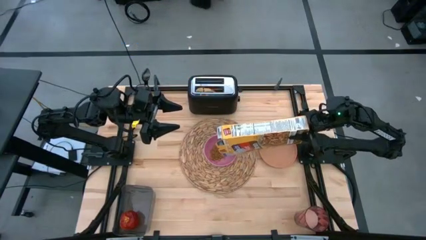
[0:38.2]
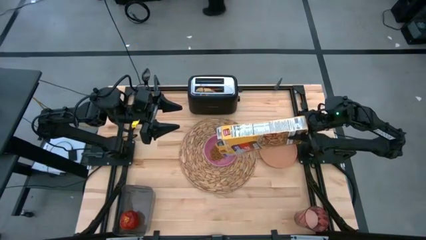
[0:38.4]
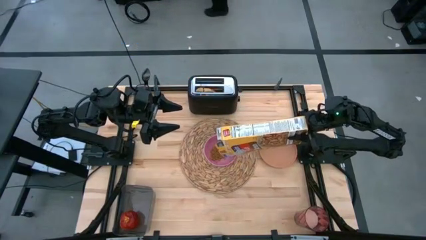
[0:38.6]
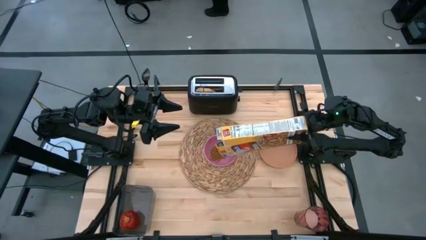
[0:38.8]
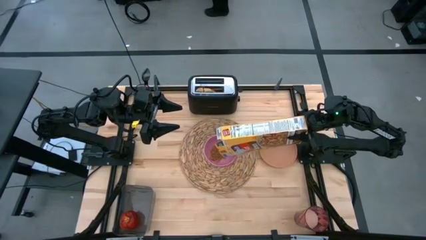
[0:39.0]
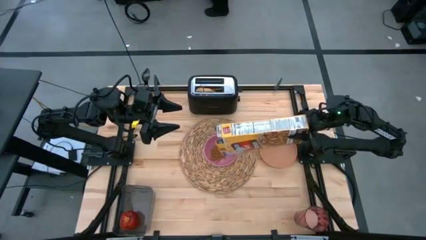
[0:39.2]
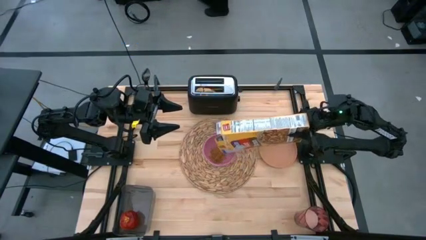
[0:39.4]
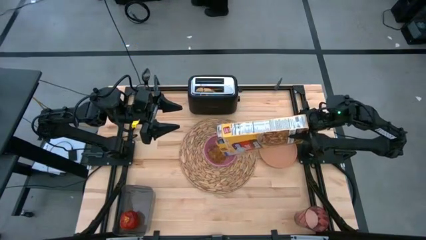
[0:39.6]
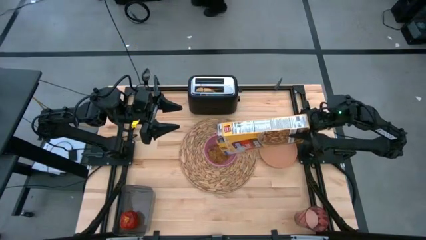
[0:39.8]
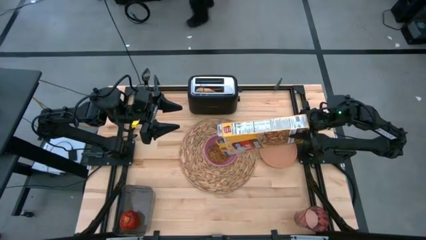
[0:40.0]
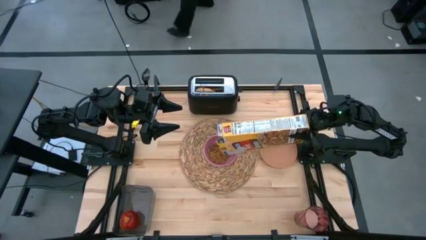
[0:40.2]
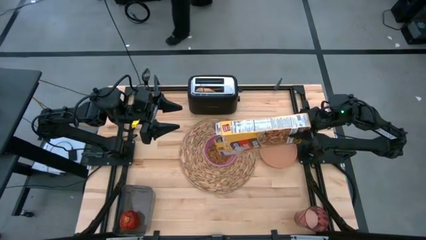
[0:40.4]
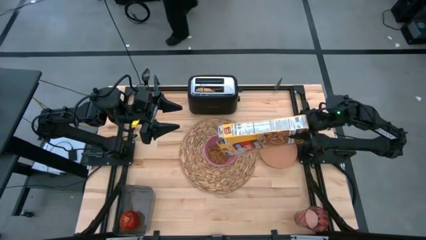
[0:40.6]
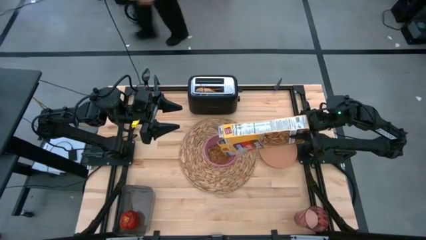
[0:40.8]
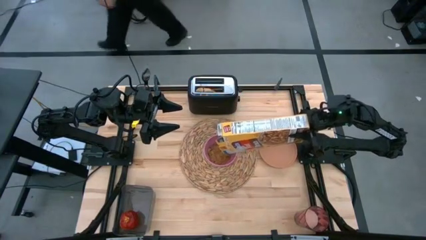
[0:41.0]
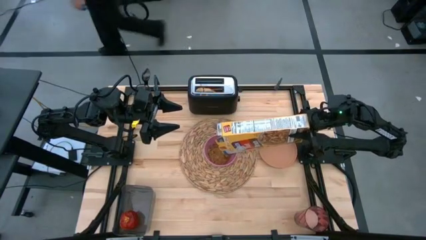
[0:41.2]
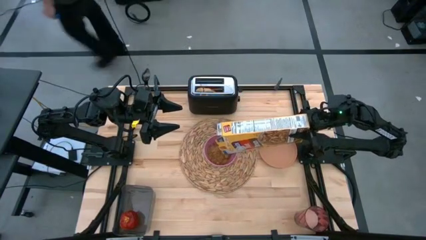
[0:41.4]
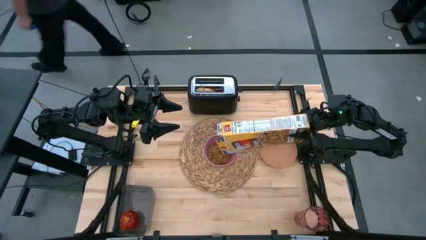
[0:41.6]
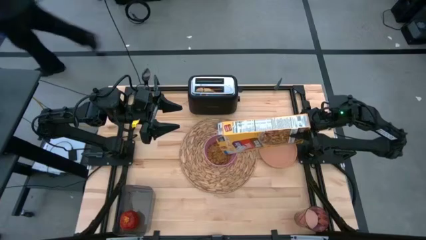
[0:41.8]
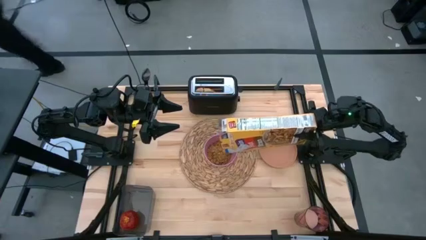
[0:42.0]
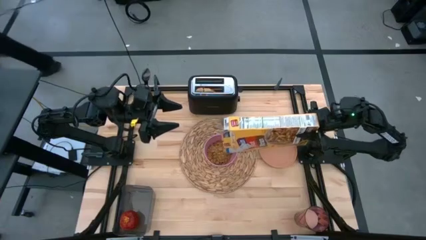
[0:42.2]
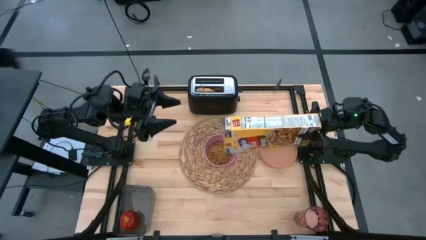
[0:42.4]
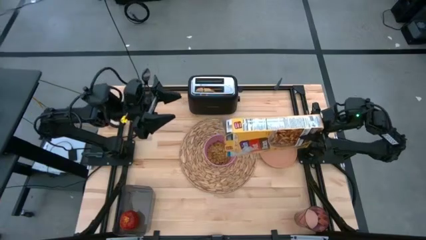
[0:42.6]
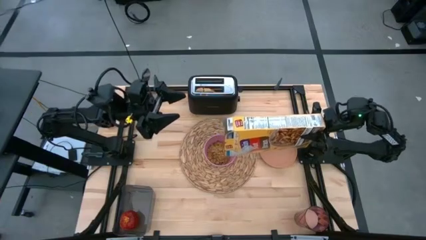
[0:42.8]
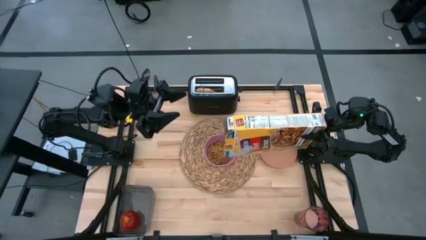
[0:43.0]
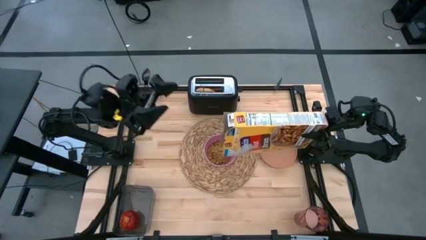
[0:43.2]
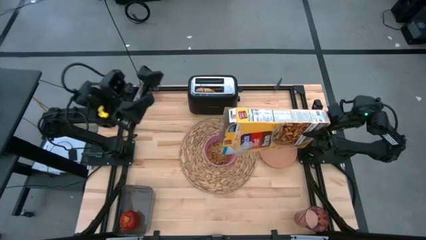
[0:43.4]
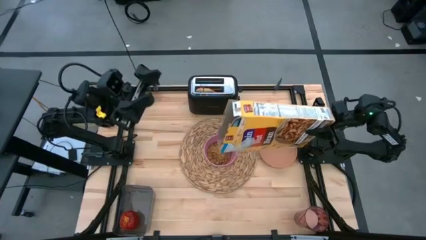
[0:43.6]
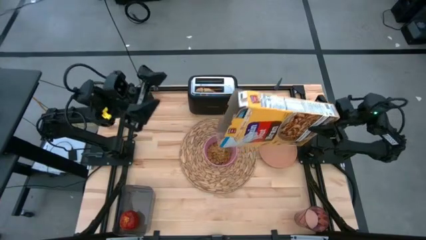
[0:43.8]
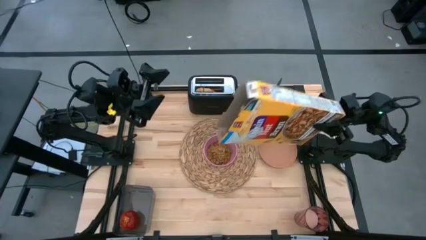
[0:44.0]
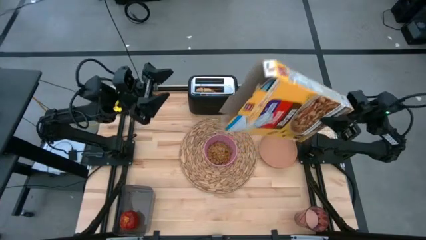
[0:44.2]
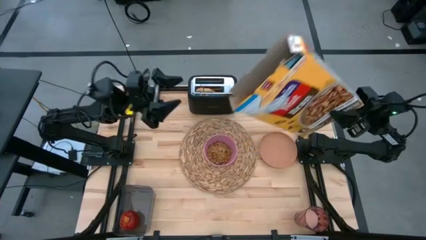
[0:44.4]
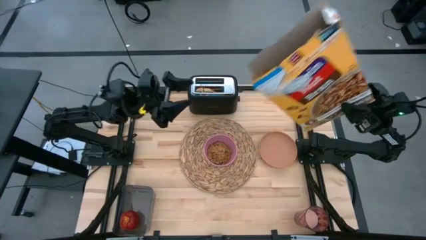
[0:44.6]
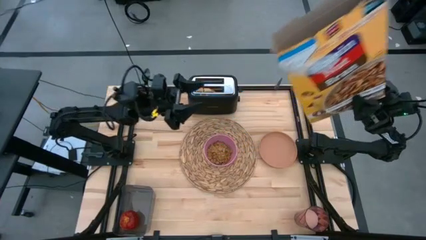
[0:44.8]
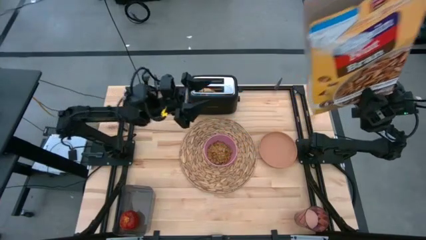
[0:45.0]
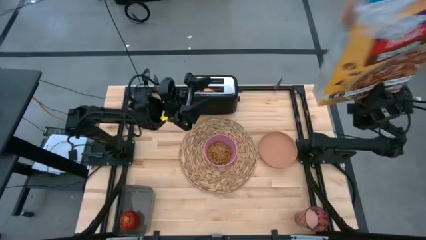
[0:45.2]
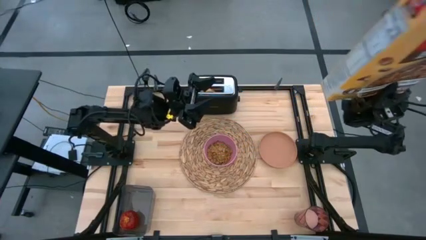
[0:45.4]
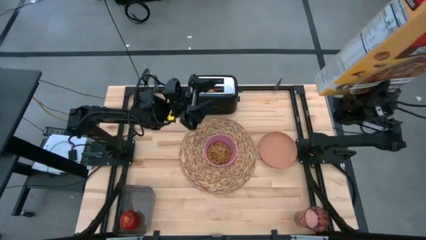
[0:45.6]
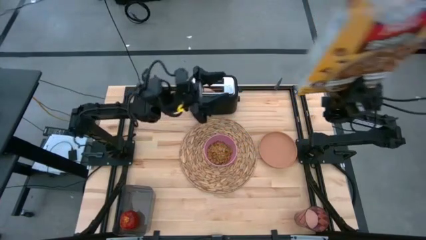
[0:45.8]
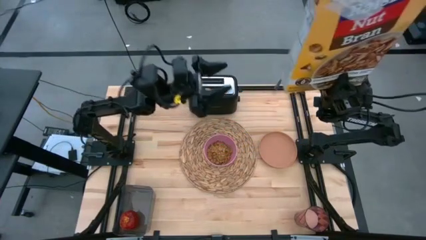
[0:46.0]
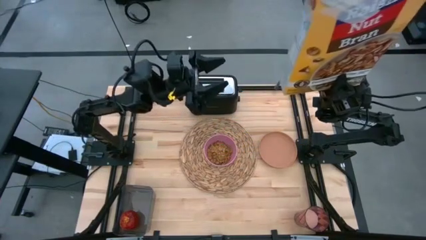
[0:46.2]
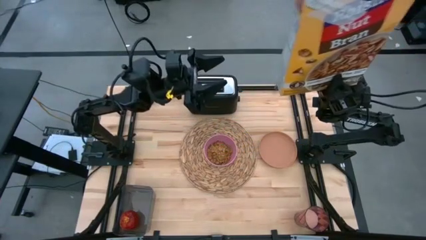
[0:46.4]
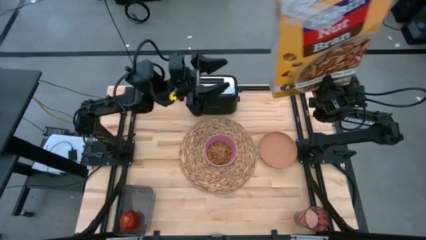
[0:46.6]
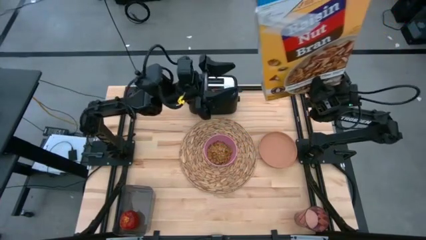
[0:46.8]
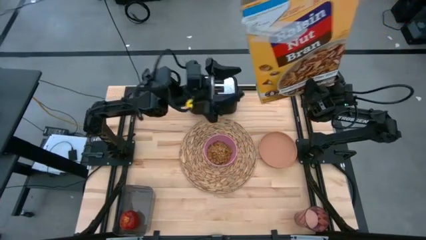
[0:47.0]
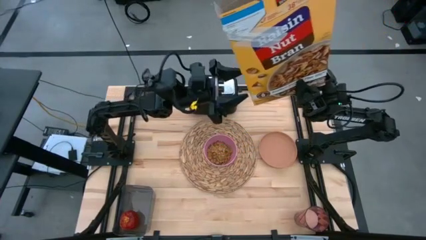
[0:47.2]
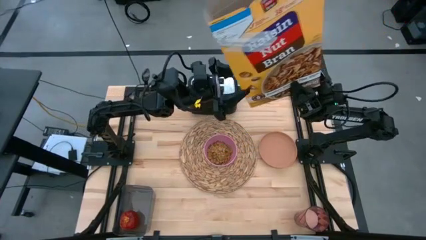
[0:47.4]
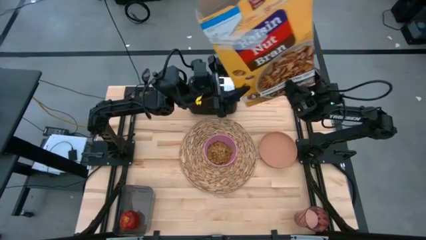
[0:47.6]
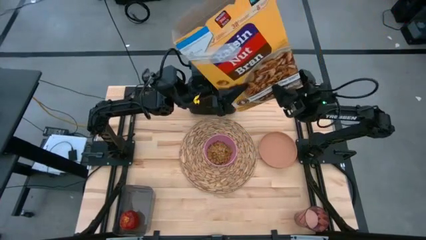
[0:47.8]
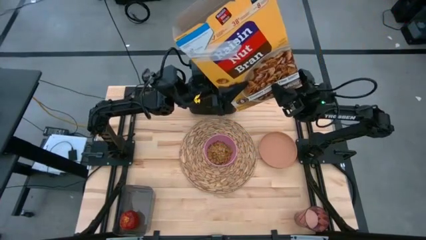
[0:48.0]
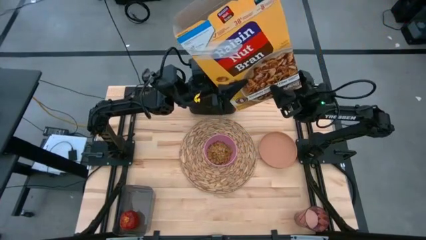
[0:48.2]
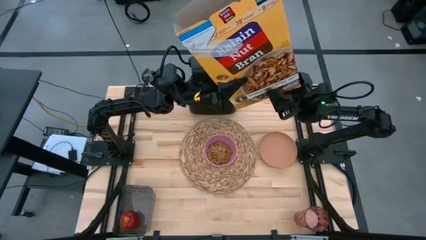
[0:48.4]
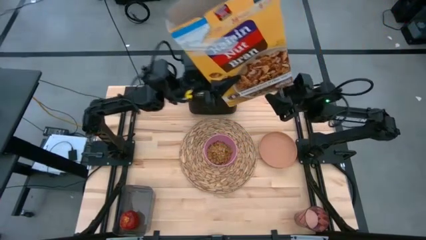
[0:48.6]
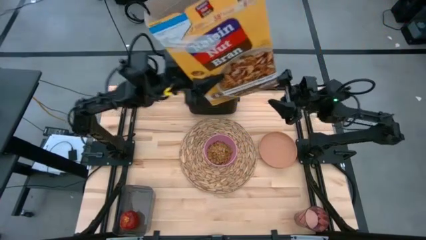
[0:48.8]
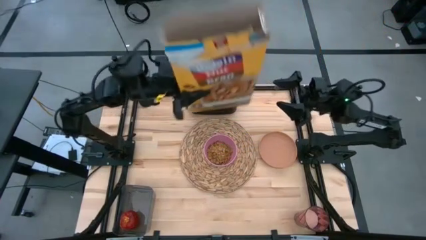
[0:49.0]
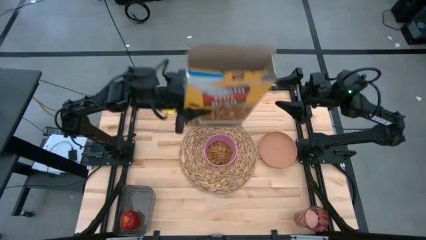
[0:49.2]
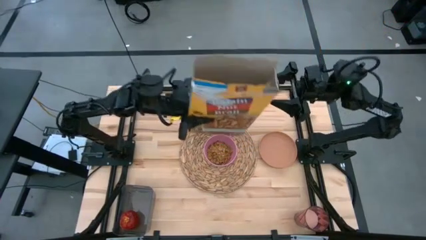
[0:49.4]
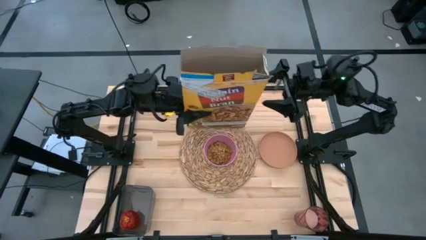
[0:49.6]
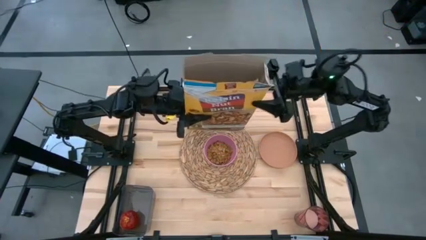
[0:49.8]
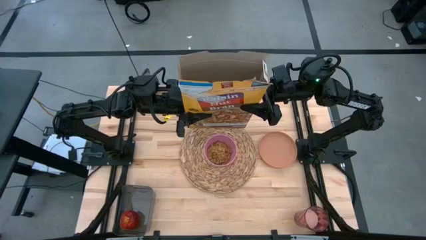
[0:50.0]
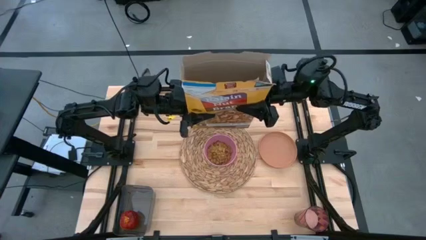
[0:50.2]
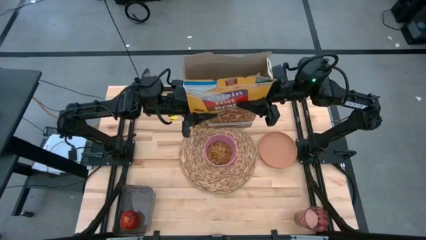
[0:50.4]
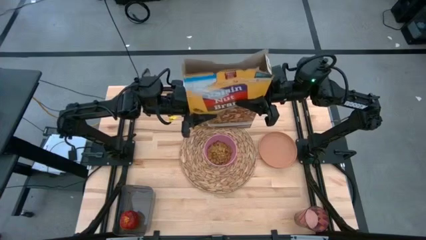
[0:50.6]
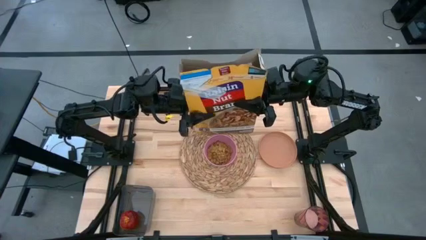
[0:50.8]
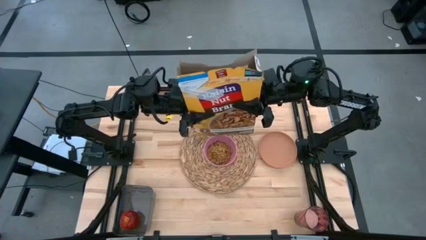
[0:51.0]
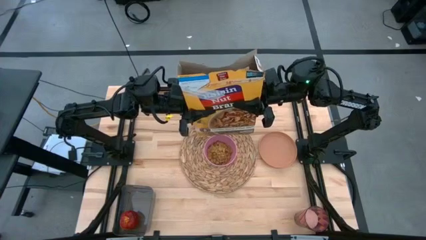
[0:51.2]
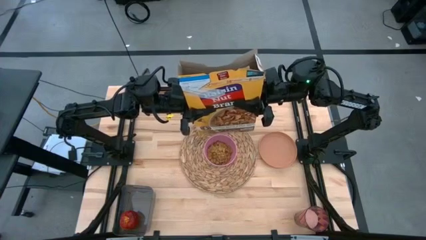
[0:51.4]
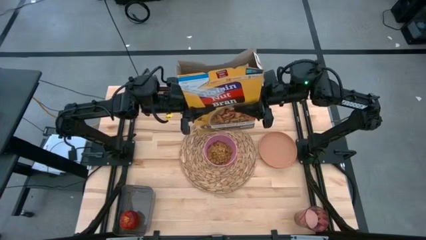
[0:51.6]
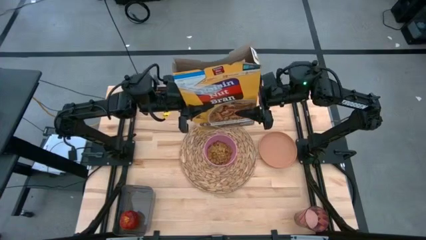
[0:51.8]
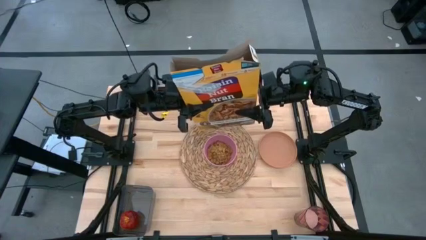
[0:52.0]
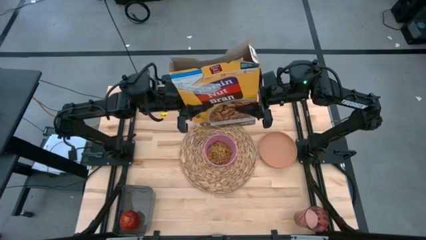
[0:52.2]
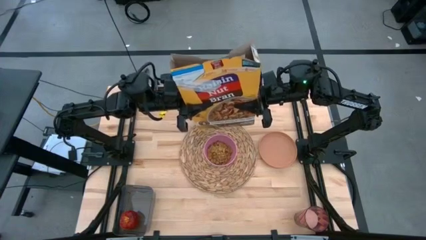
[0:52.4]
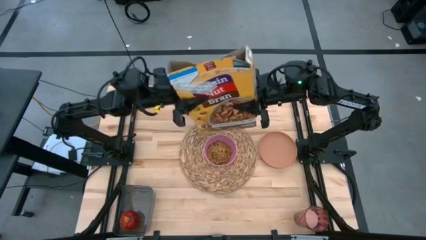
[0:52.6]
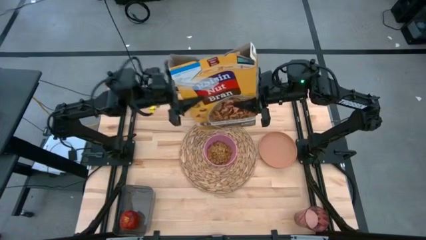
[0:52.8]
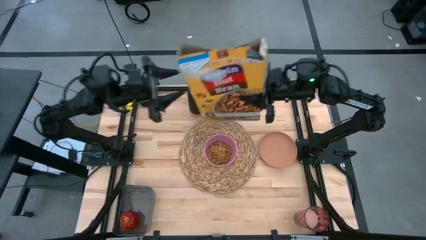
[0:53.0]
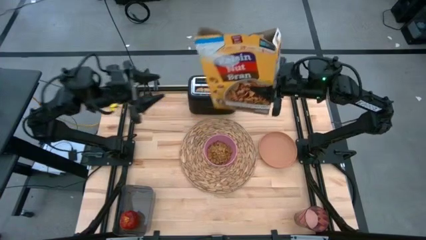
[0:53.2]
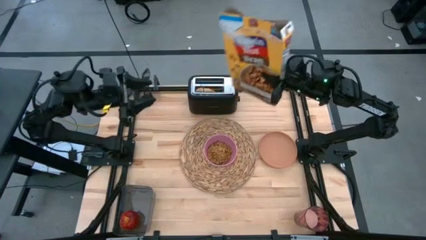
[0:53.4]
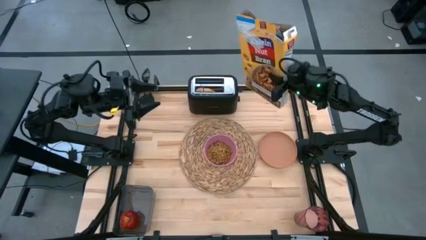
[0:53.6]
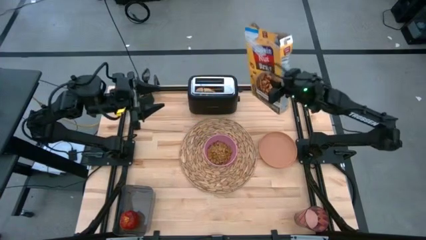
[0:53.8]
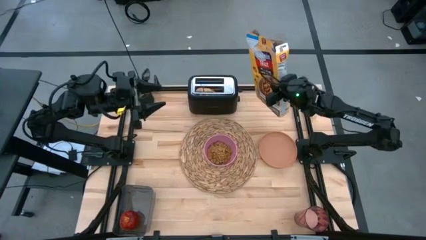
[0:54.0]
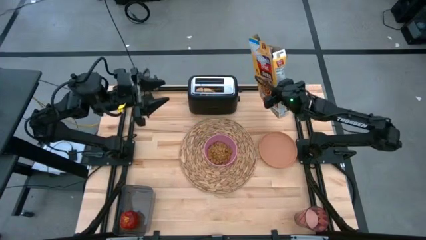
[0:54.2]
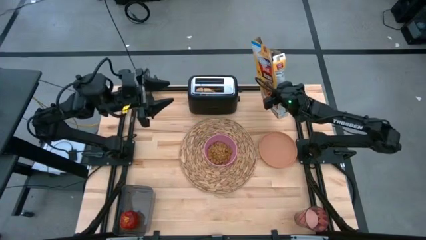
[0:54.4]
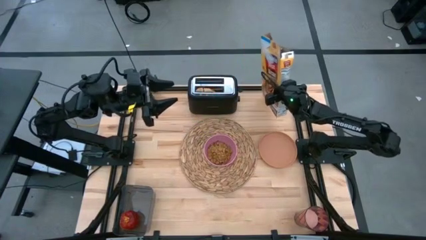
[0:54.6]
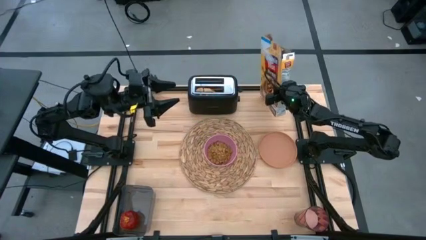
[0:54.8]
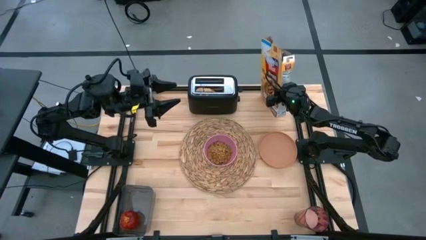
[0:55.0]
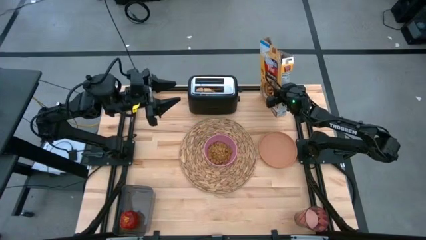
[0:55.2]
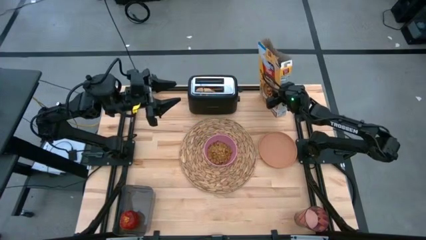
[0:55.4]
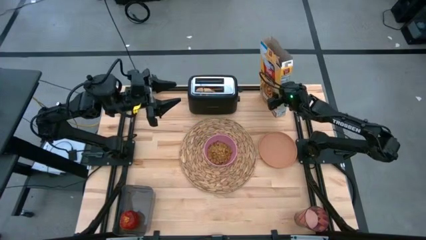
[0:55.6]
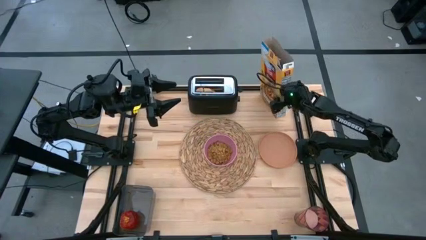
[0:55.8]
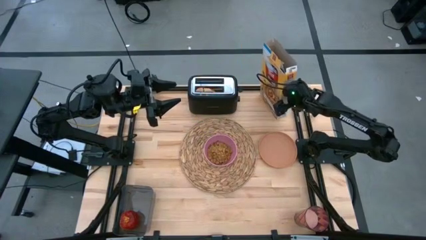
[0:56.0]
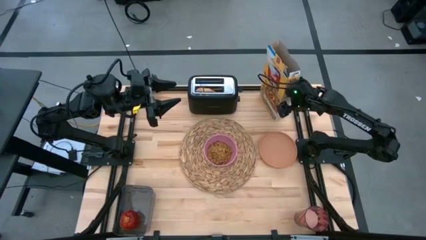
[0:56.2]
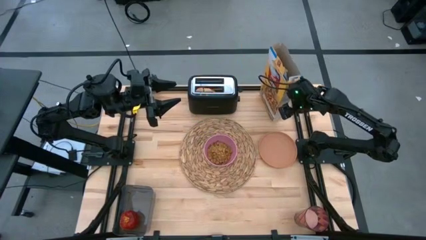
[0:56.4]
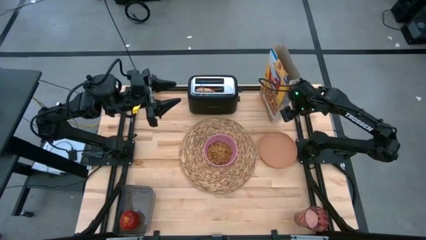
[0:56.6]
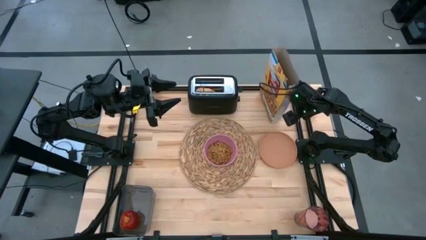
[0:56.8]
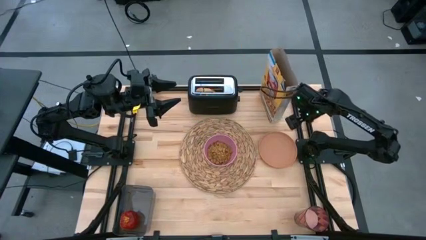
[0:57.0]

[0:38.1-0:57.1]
Task: Arrange a breakfast setting
Pour the cereal from the box into the pink bowl
